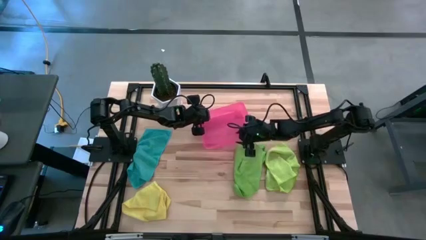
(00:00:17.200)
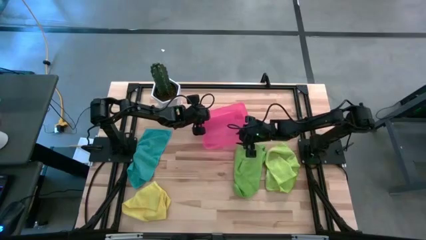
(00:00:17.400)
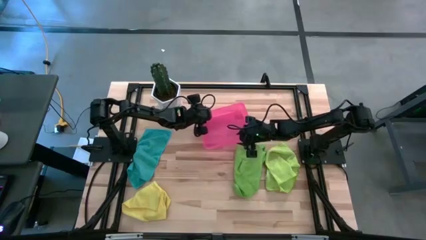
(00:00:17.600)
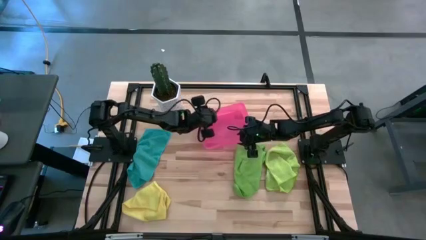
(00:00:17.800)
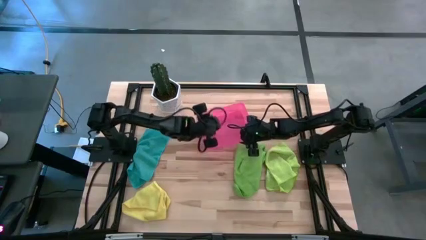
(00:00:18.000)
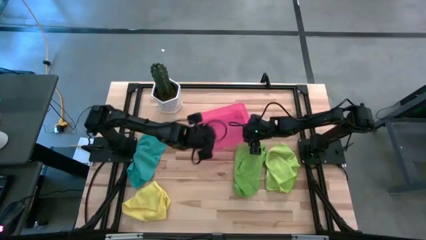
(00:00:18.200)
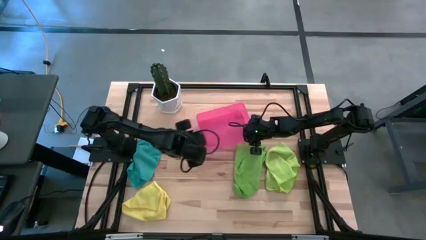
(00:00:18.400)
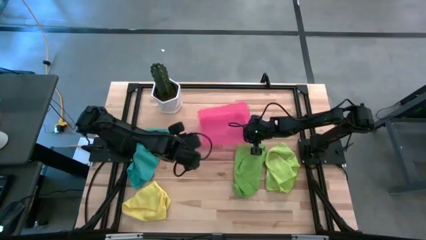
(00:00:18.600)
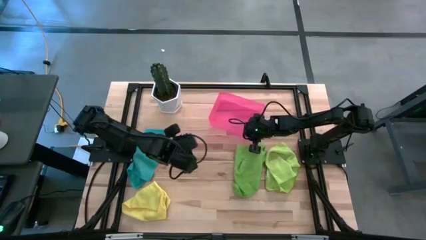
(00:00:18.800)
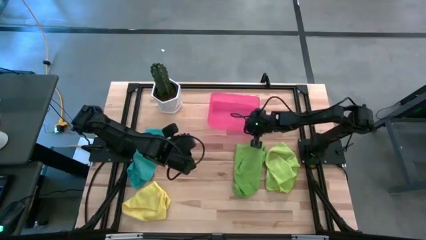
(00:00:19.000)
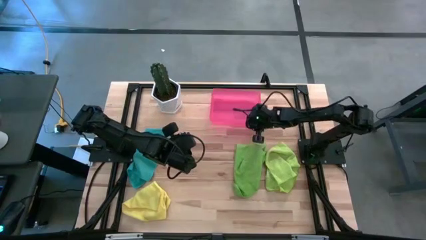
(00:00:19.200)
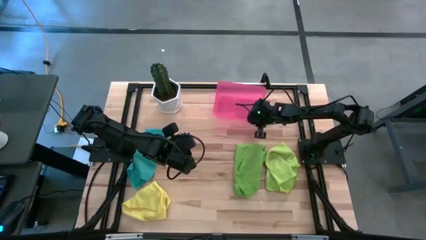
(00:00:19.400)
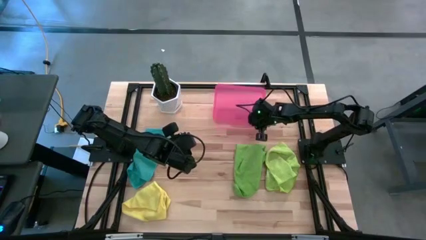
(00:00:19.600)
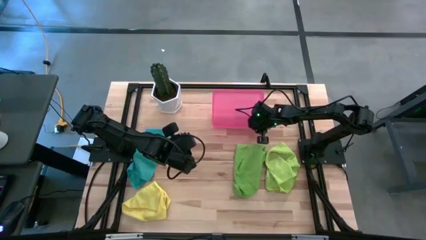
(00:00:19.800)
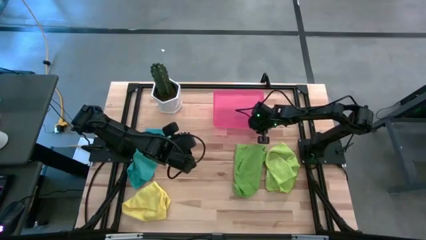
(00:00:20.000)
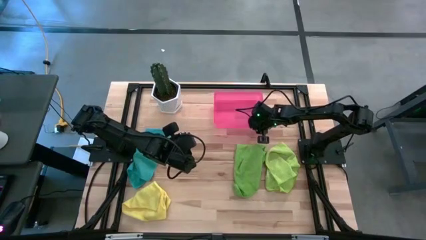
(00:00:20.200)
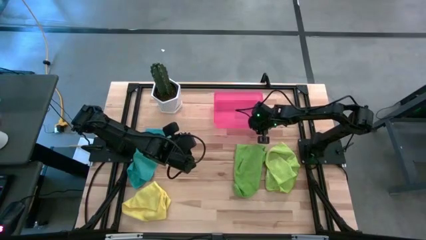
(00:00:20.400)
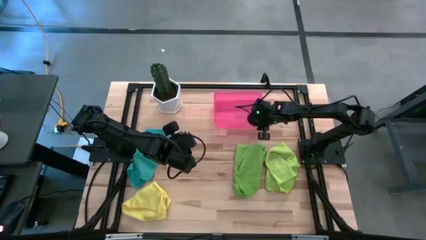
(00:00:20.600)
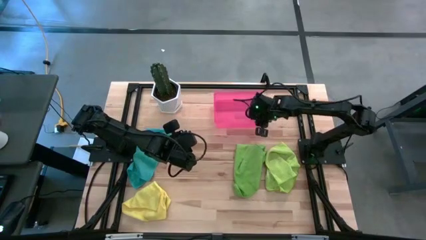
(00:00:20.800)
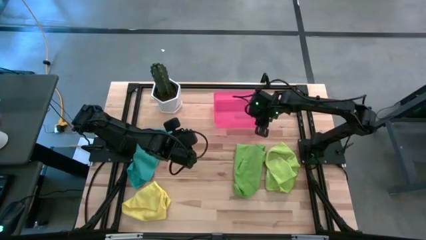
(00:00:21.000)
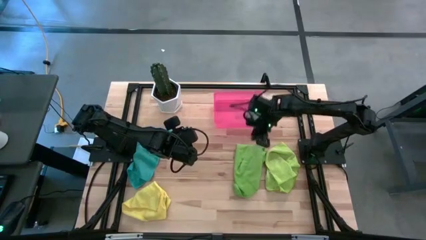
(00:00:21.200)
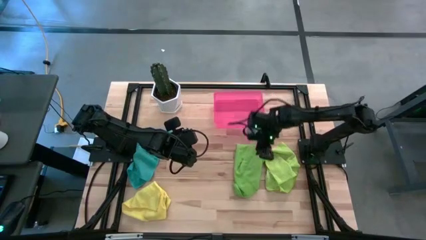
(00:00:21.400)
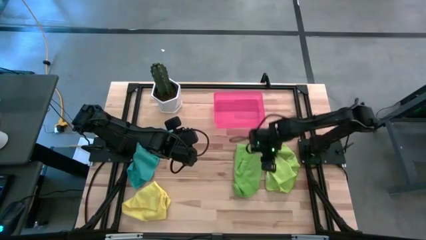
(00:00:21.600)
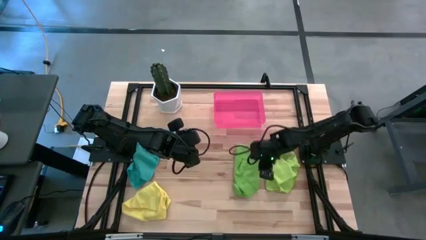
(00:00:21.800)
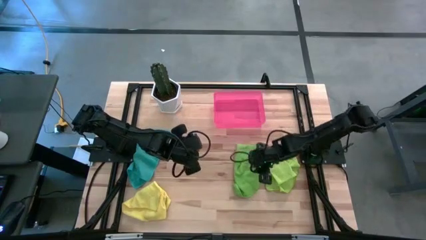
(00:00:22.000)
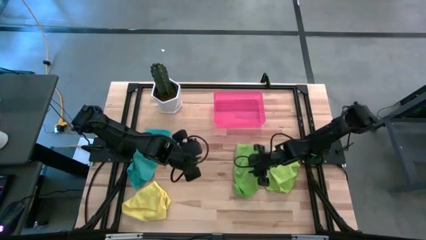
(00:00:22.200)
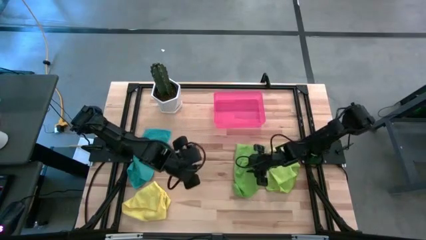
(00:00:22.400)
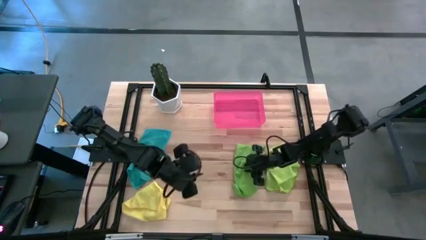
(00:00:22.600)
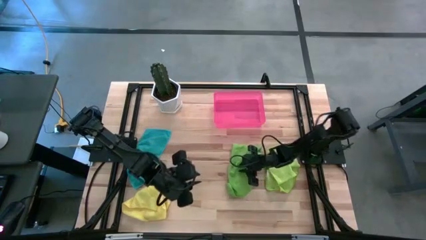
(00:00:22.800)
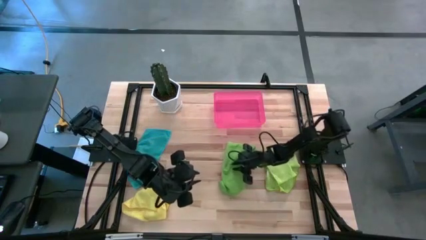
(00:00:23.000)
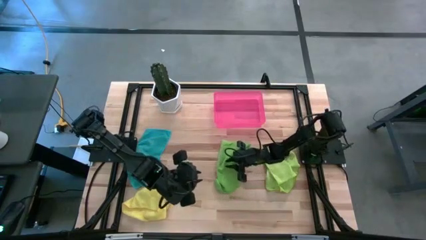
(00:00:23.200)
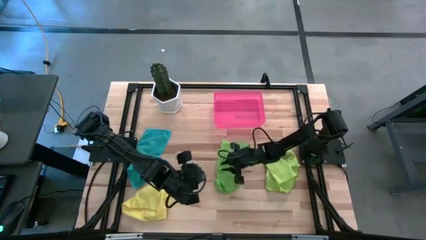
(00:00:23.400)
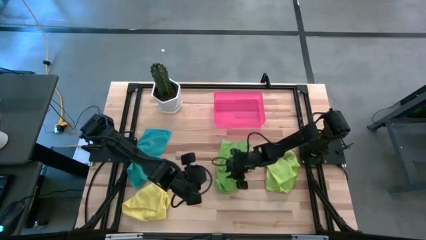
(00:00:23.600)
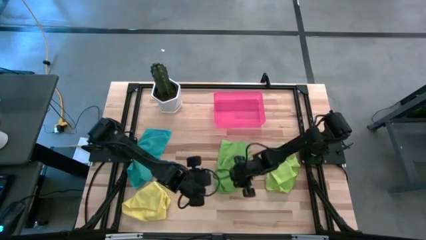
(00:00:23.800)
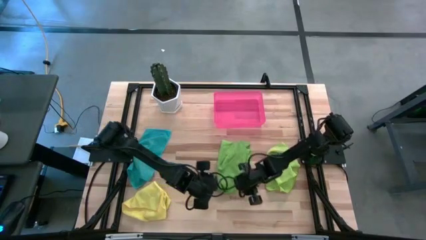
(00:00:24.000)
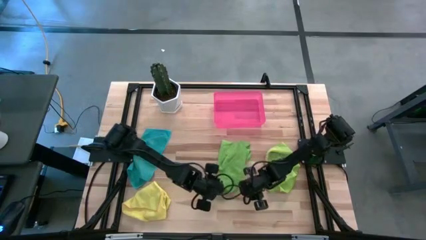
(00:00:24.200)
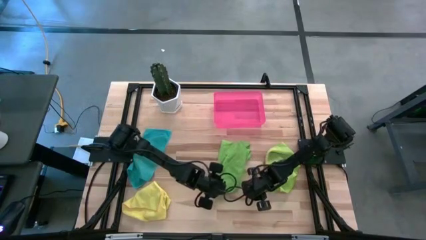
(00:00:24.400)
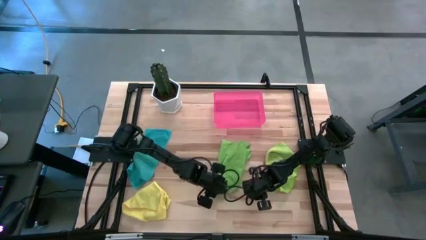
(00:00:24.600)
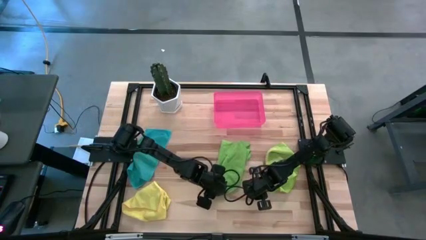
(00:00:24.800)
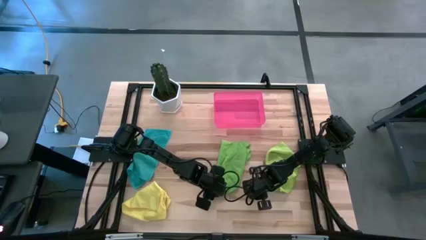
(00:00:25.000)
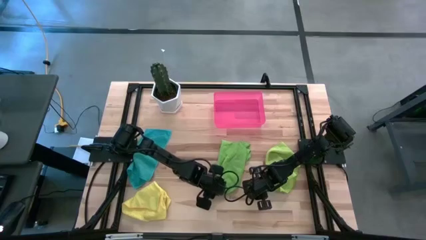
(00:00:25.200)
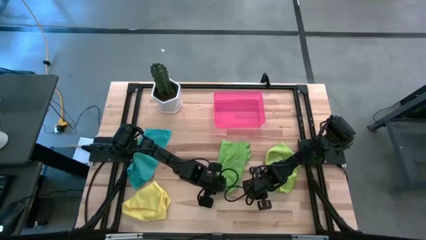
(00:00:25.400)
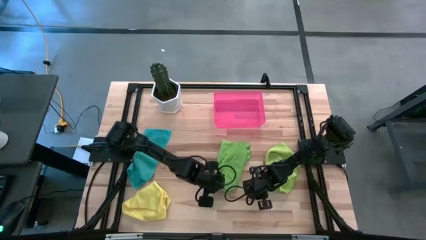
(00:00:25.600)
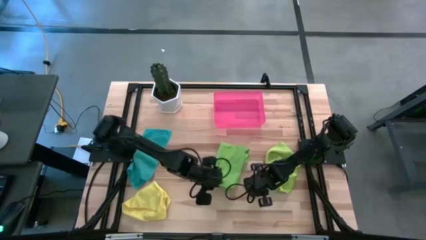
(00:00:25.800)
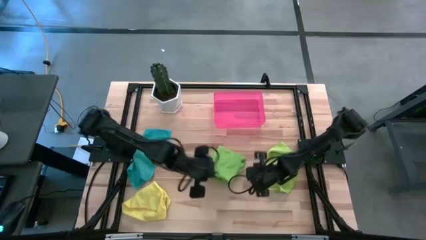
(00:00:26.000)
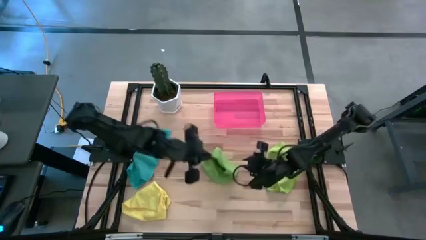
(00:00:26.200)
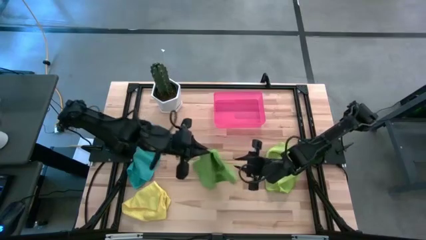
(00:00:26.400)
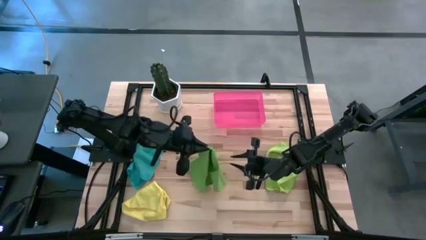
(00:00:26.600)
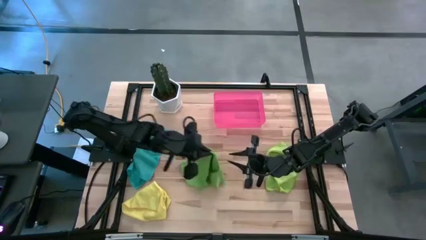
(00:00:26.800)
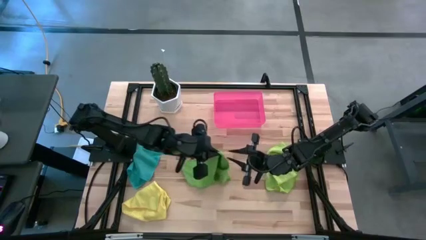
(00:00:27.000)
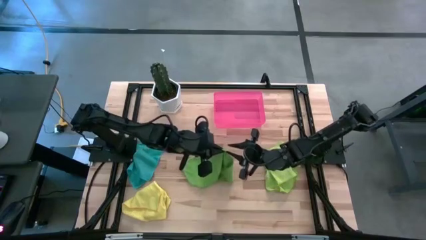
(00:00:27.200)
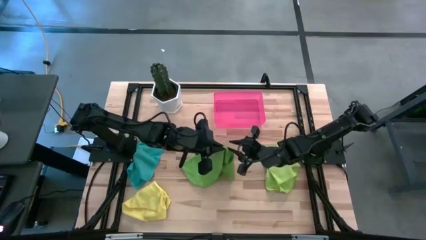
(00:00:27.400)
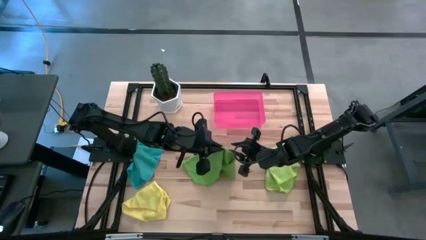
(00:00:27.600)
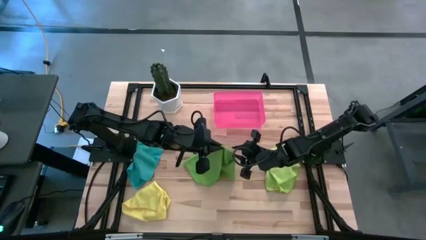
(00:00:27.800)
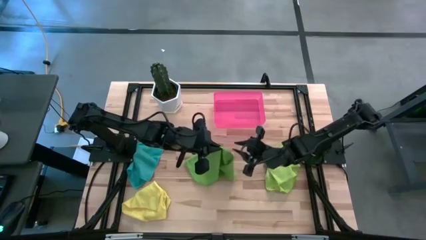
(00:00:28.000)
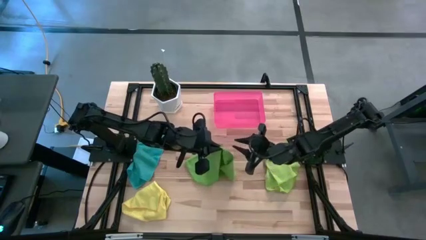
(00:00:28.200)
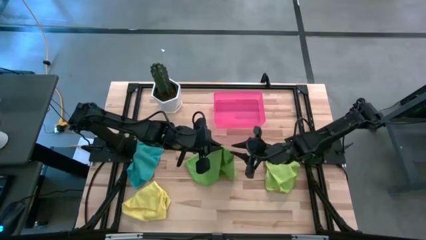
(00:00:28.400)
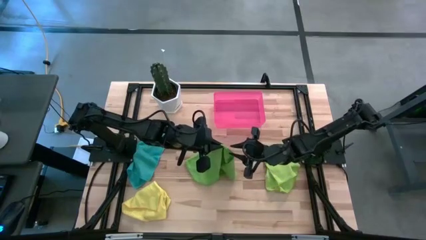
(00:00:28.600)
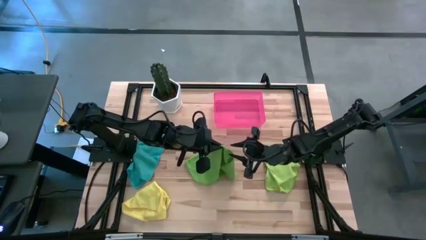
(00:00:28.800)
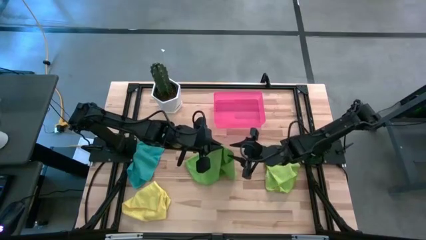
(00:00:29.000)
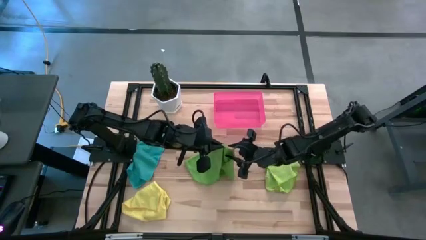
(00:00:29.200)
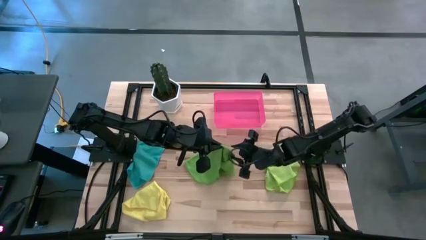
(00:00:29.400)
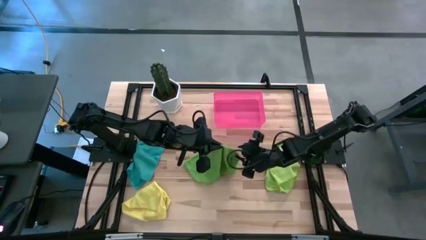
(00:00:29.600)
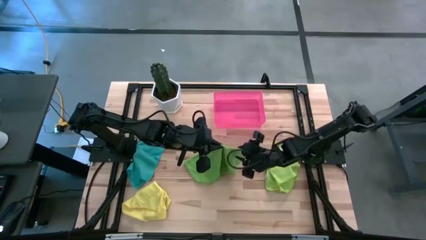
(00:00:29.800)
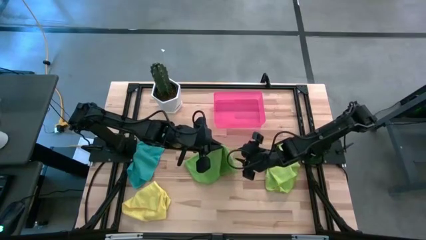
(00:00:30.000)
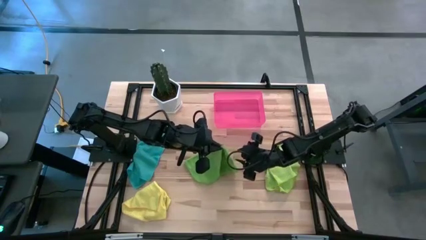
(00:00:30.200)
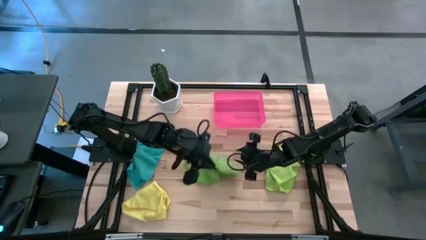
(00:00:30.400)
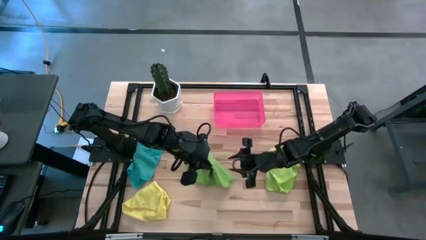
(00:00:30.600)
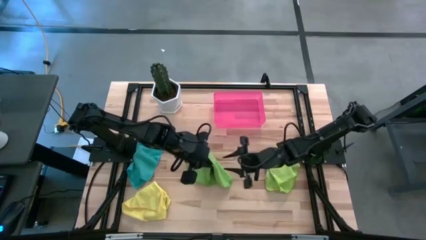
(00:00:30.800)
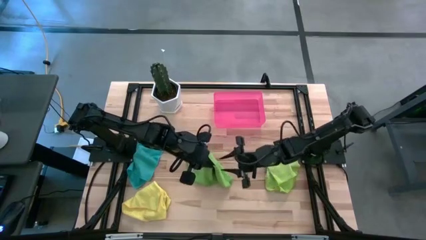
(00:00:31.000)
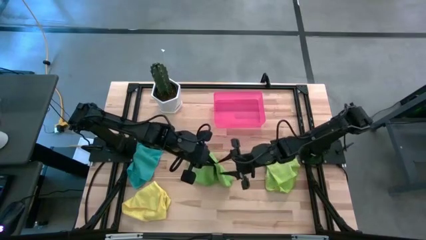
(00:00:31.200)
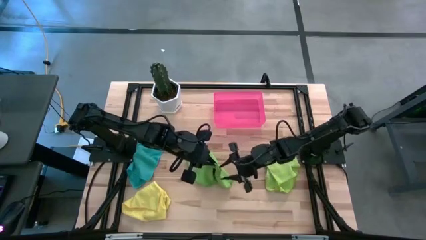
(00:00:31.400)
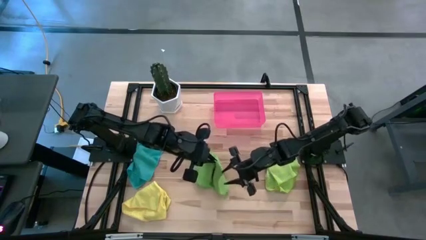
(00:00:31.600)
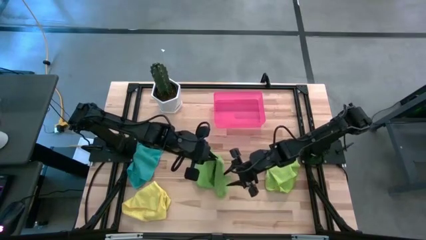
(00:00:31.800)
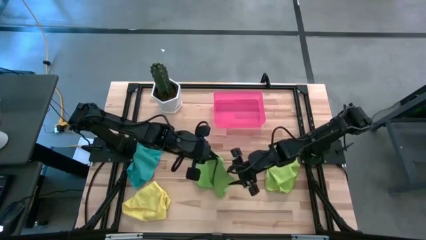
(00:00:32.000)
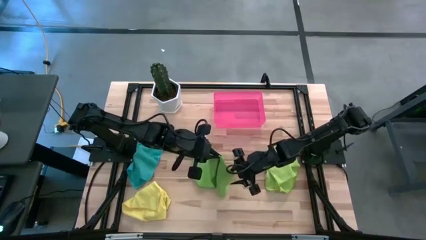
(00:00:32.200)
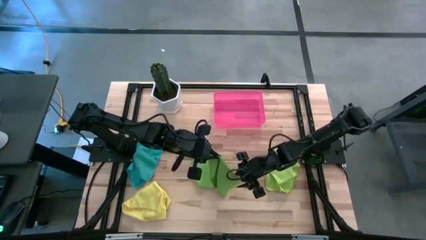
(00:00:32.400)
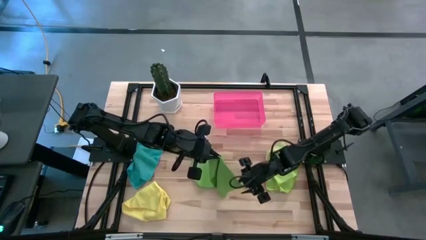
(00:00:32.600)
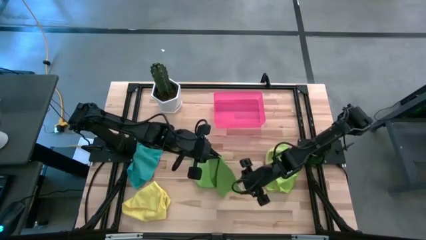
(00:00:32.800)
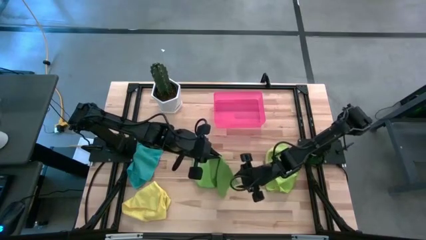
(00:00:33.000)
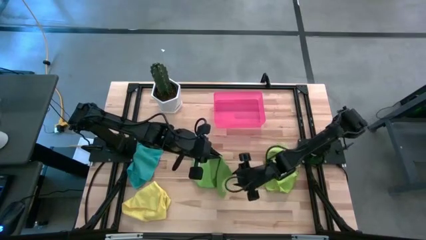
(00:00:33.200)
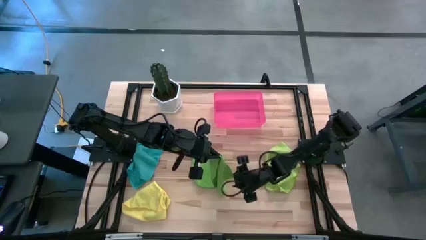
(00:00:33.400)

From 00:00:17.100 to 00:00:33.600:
Task: Roll microfiber towels into tight, uniform cylinder then place into a basket
Roll the green microfiber cloth
